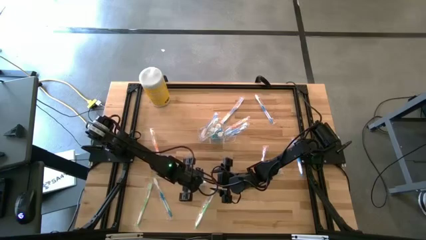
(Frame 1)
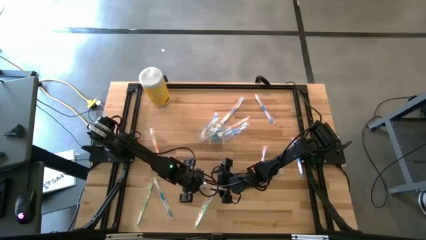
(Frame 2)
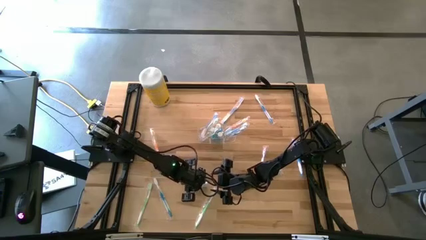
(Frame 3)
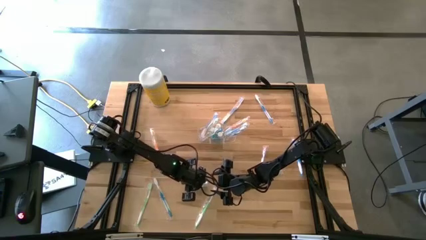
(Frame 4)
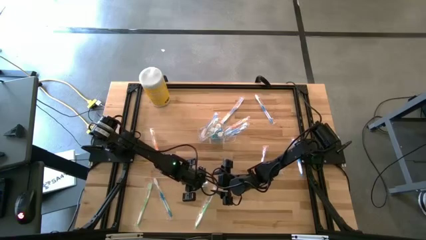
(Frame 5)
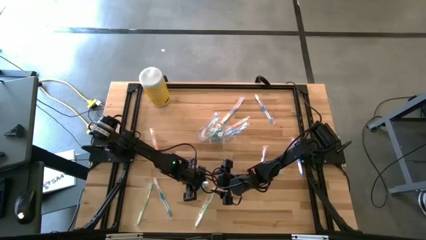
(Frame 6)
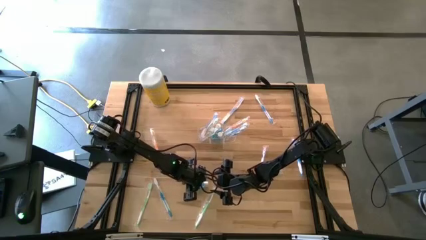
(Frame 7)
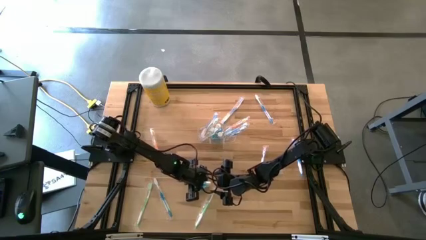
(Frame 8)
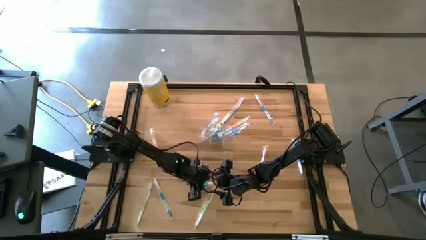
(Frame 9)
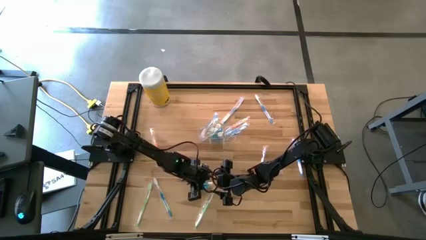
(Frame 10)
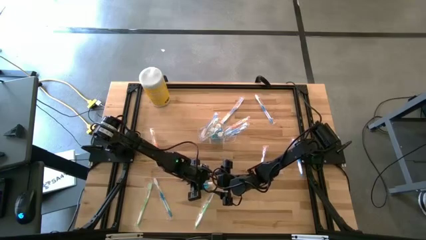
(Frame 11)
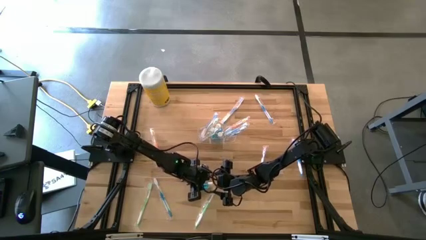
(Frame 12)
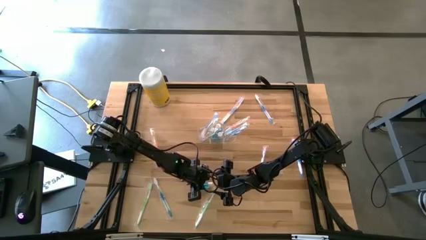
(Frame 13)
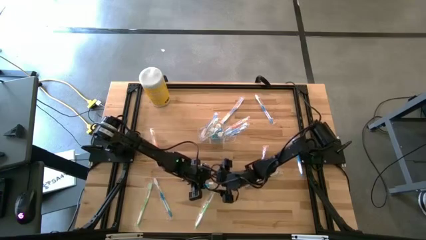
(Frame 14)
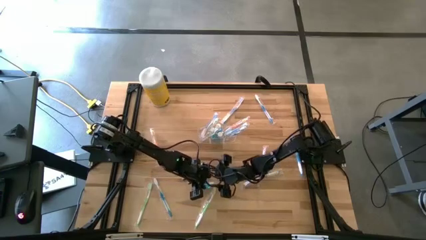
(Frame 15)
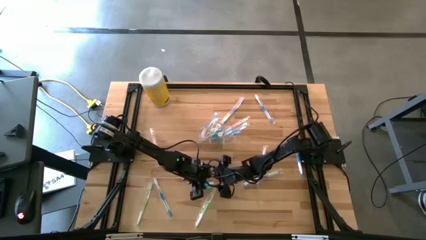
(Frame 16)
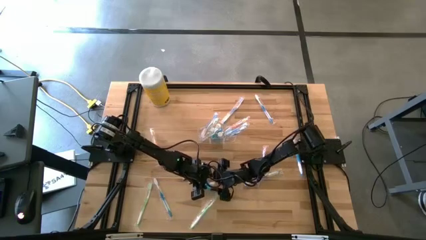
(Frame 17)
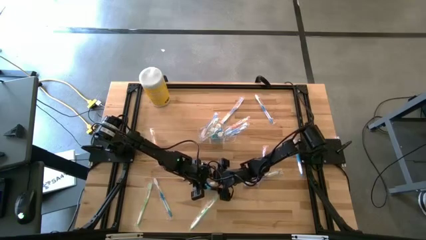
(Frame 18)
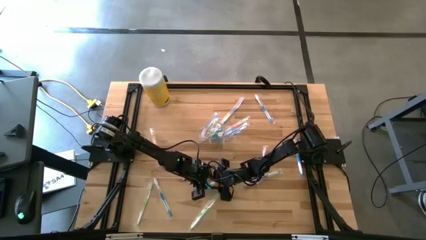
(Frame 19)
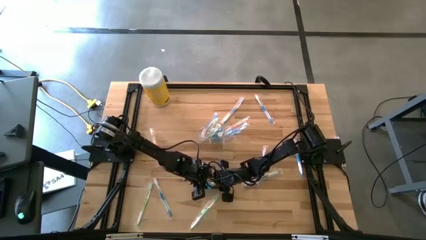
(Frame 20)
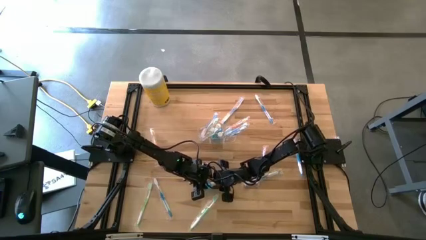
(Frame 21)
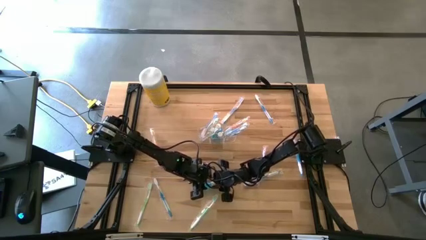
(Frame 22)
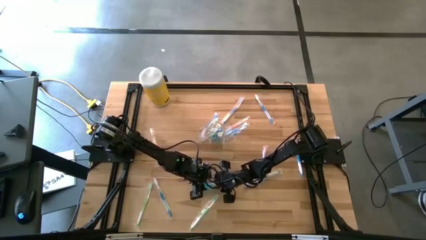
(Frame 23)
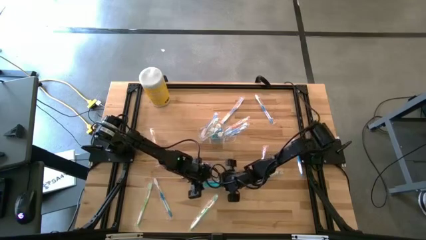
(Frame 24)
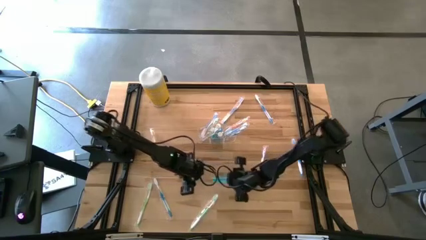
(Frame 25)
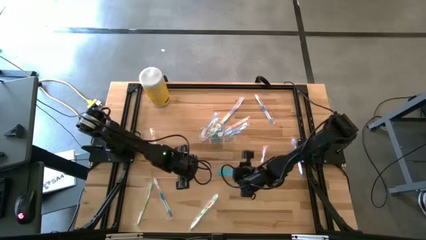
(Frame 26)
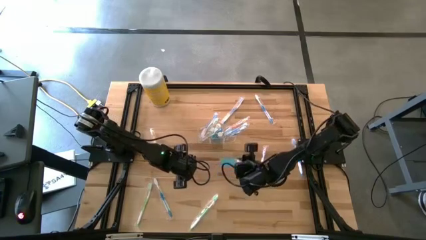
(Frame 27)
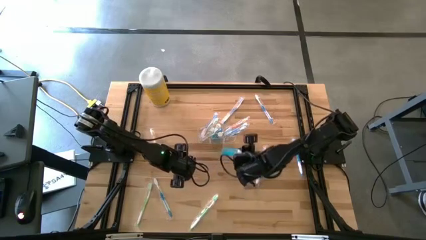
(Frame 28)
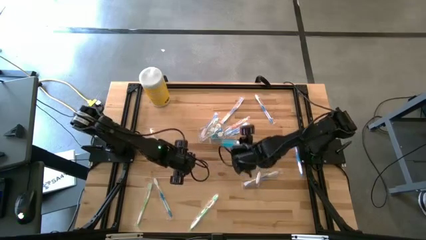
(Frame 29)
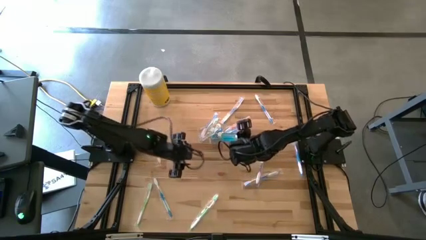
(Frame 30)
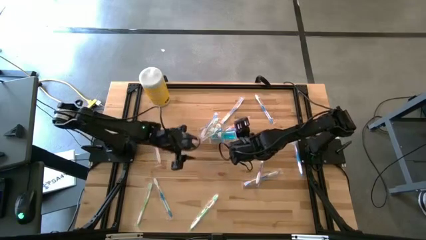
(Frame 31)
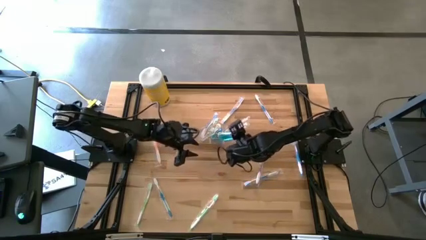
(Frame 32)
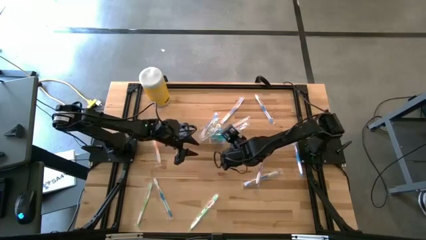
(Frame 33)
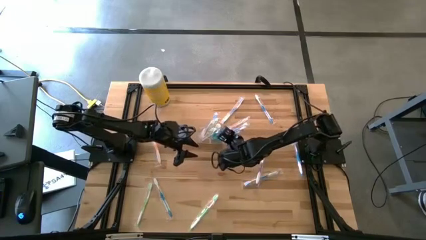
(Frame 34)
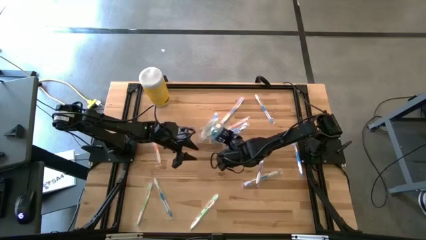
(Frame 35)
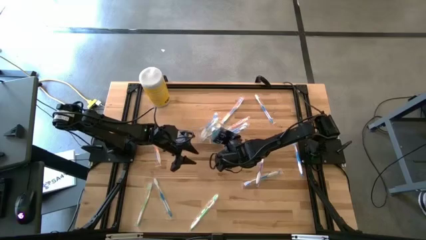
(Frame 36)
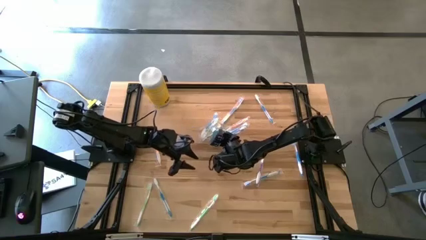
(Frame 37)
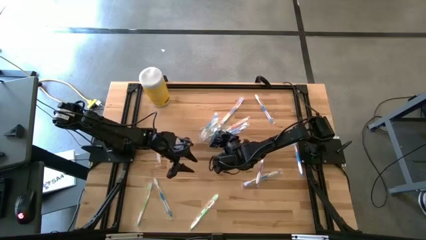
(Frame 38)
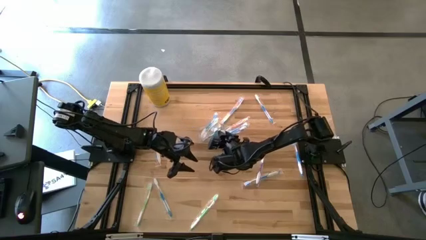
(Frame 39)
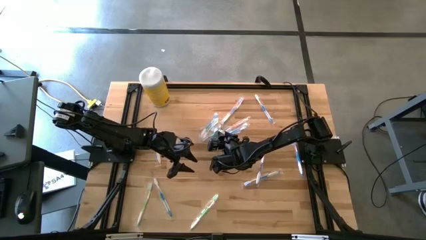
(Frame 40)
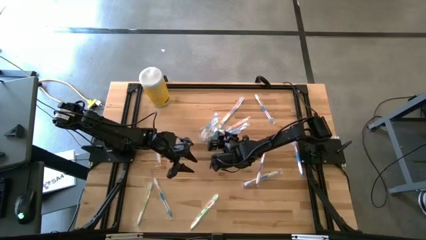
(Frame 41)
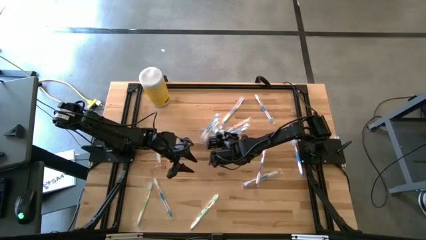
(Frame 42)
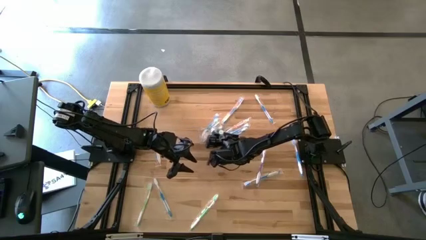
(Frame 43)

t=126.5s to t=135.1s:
Task: Pick & Place toothbrushing station
Put the blue mouthwash into the transparent organizer

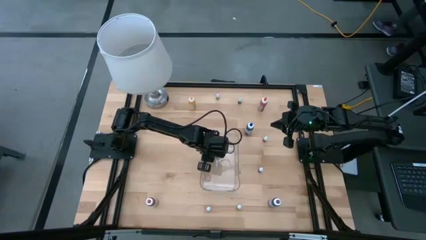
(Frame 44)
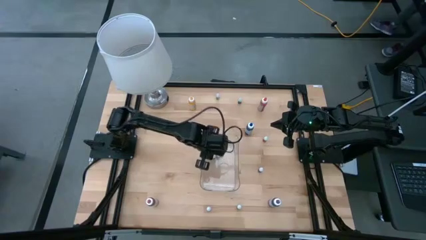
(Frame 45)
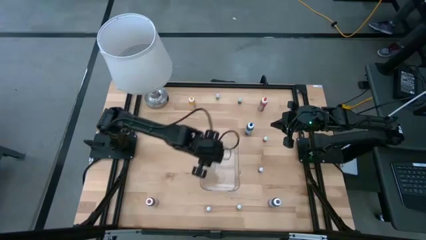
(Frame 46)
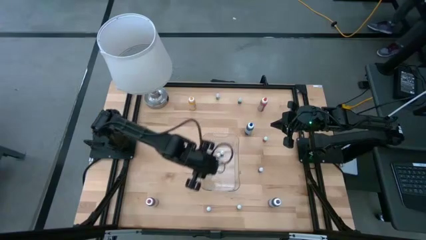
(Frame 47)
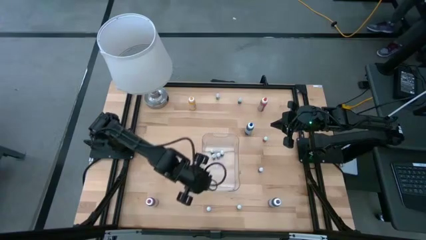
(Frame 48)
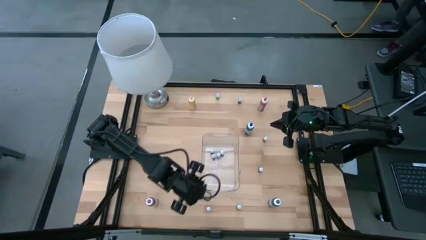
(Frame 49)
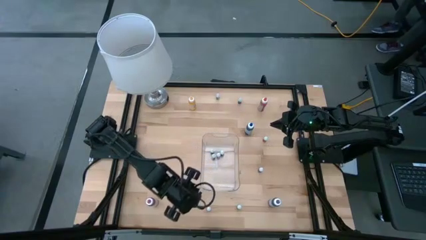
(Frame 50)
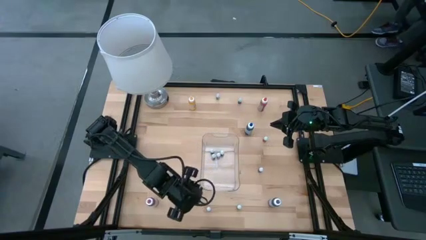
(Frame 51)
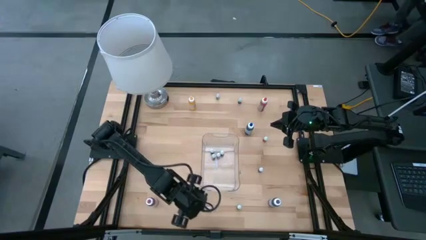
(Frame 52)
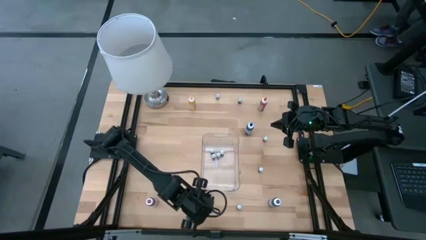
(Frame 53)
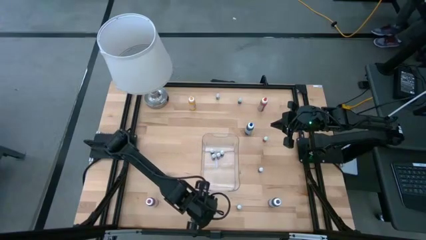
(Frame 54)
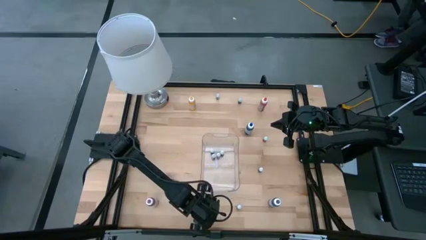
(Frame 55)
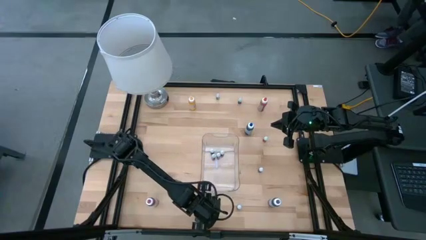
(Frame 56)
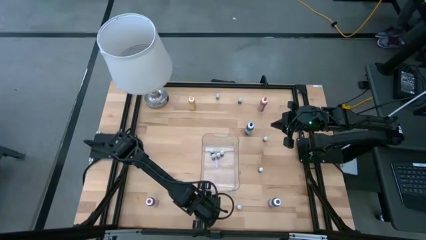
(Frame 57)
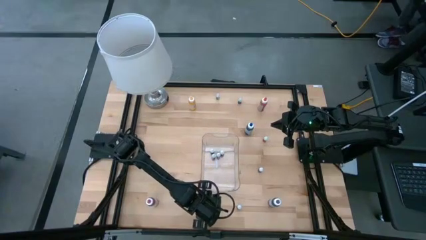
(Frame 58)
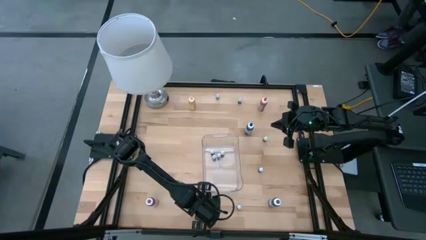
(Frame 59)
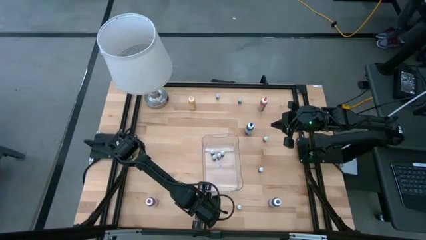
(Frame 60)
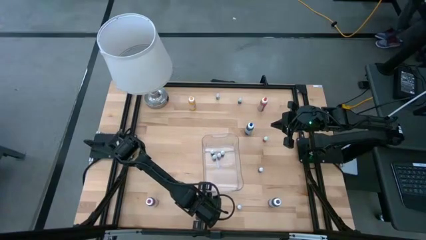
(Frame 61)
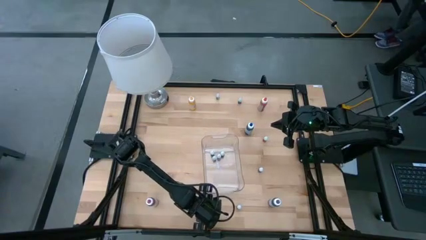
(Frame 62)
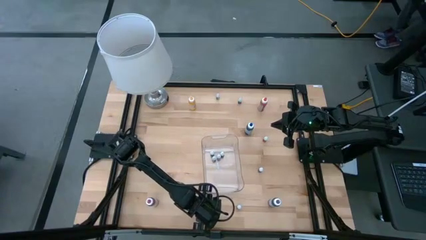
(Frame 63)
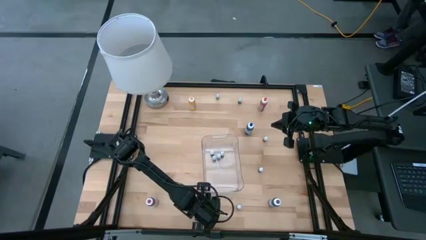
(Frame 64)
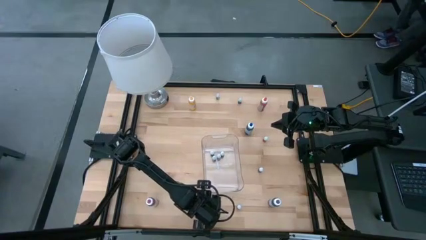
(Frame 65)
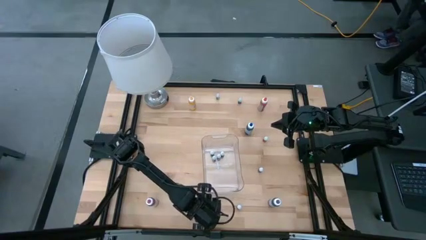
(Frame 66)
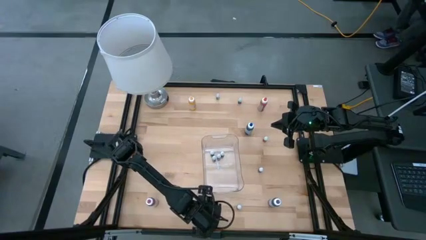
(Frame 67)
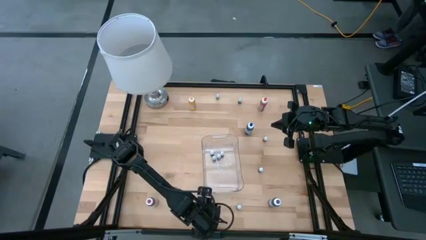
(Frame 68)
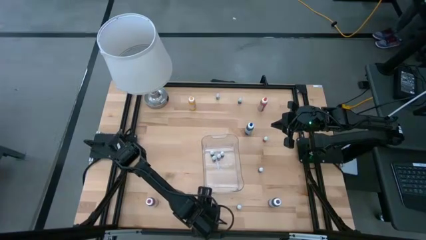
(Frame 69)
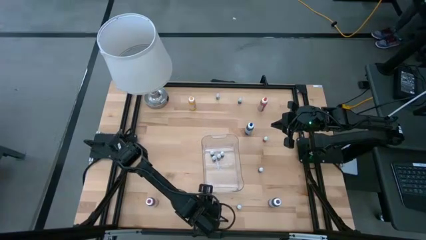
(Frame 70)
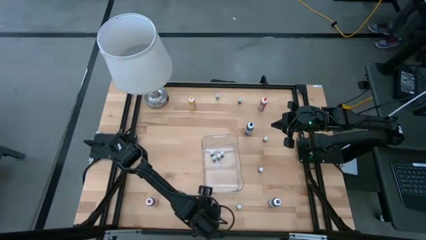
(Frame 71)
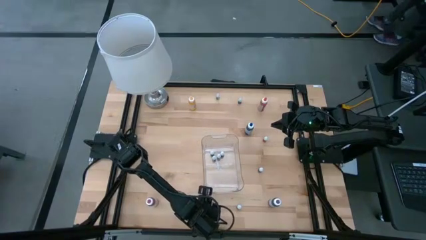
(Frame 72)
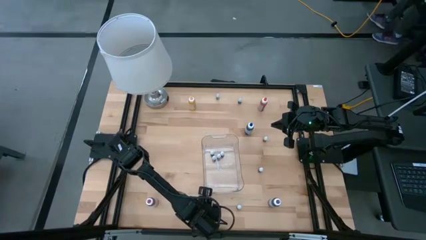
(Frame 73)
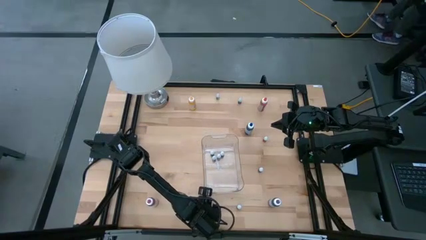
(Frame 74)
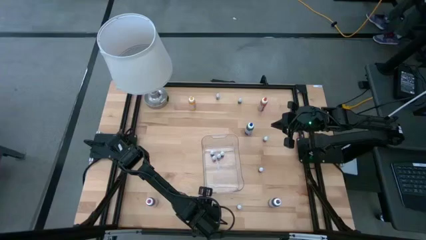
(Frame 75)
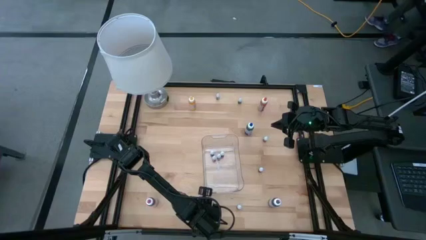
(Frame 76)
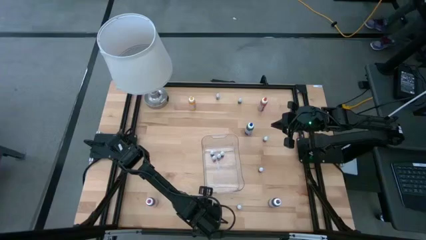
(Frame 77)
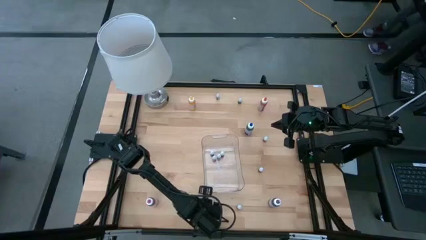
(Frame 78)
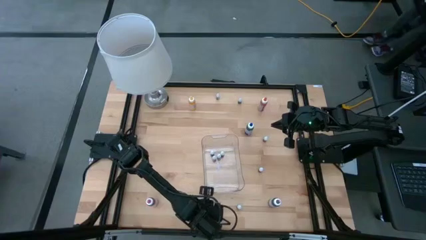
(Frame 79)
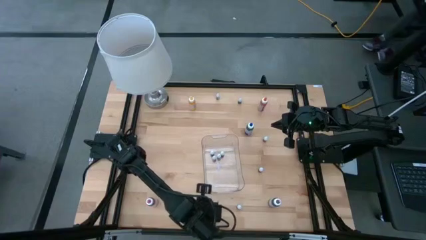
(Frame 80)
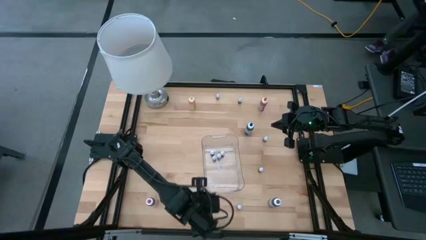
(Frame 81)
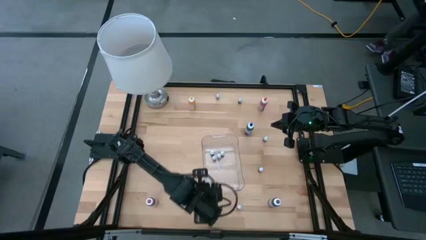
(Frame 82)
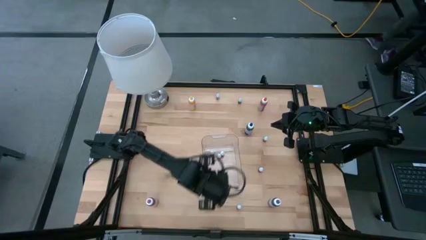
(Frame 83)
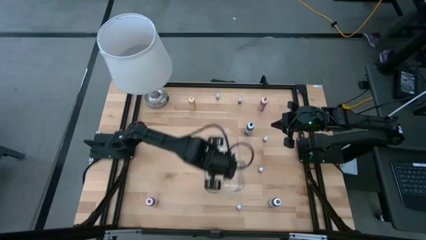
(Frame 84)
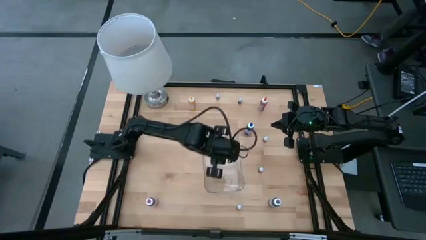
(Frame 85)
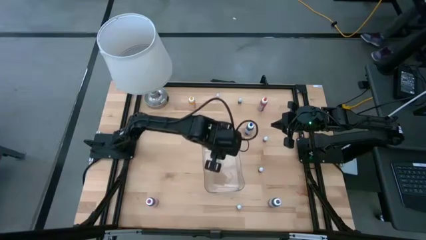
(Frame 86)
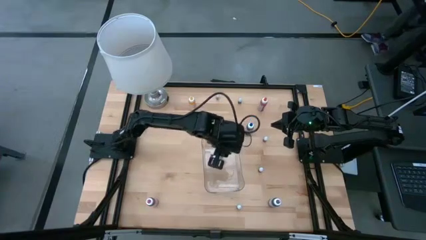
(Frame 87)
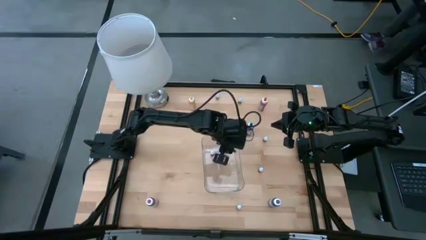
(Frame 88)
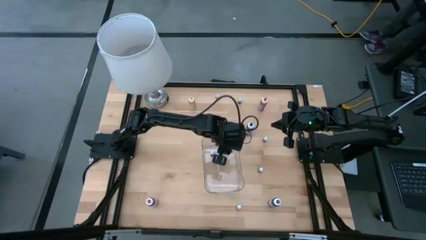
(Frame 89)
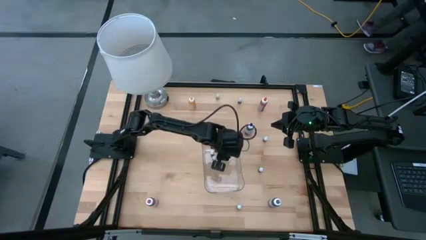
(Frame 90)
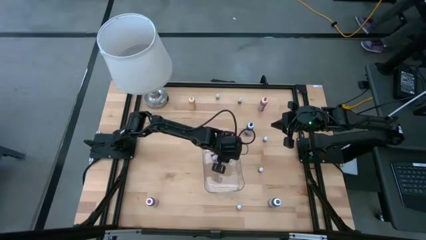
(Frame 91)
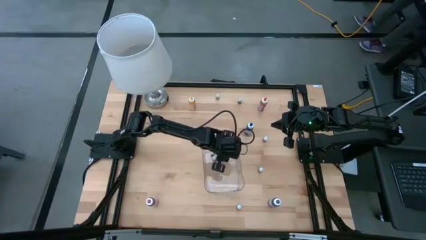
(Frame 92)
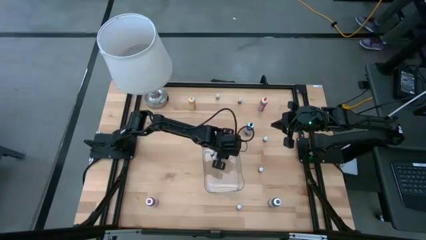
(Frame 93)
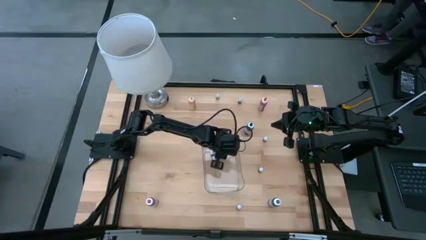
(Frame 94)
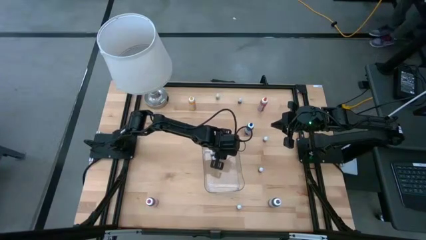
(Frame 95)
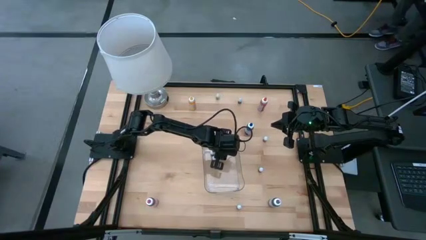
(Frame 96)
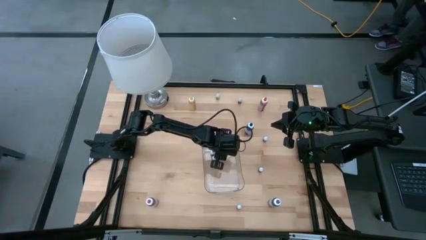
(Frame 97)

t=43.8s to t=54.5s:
Task: Pick & Place food coloring
Put the left small brown food coloring bottle into the transparent container
